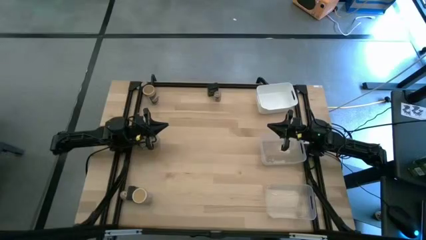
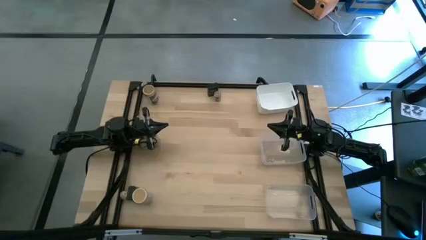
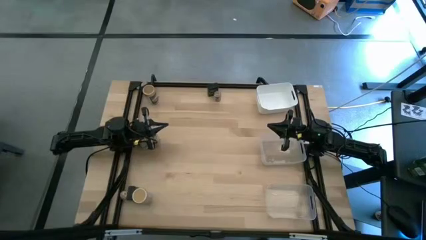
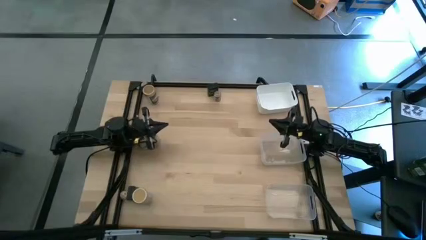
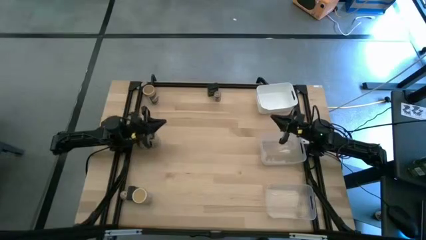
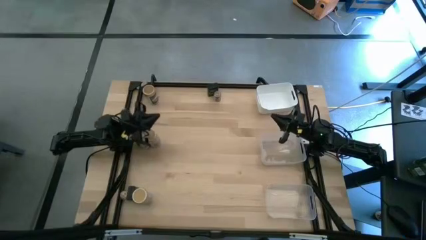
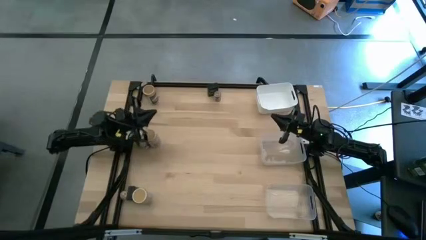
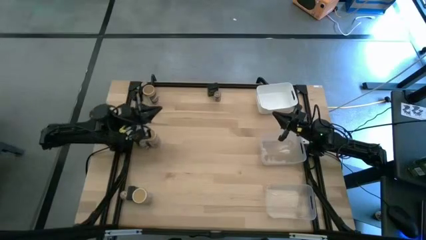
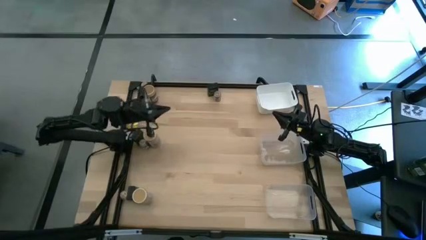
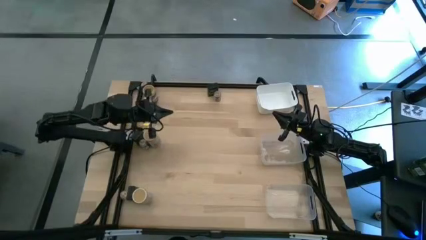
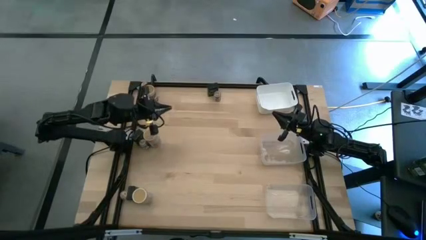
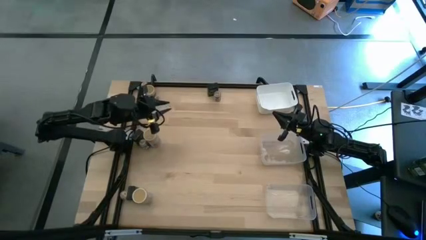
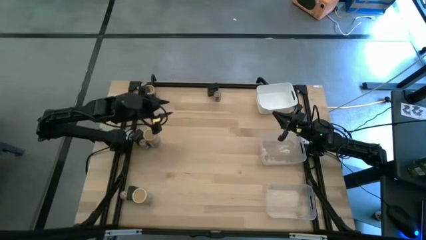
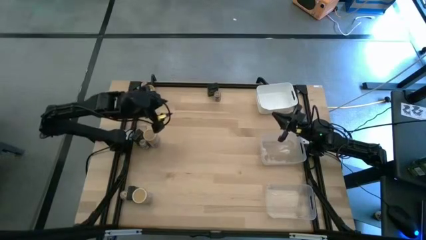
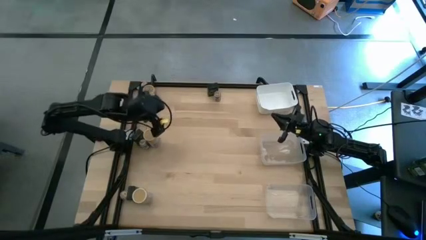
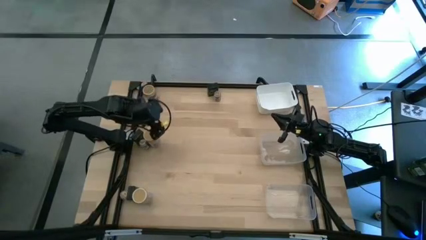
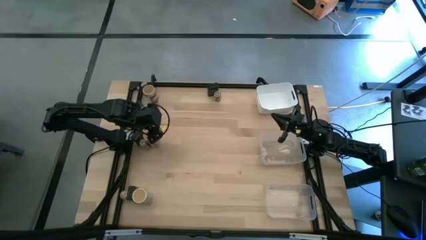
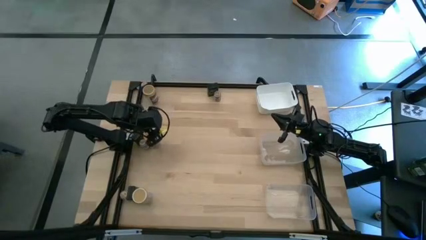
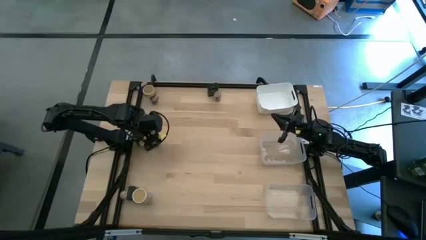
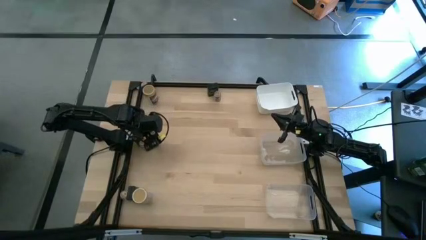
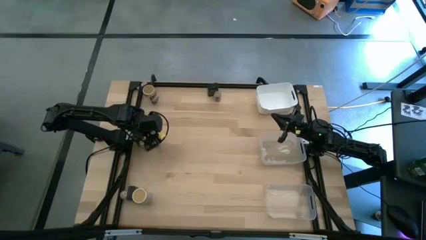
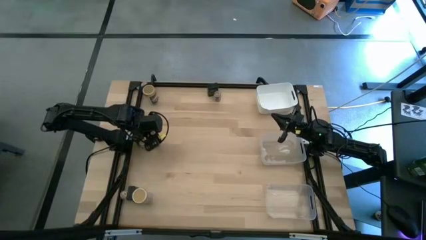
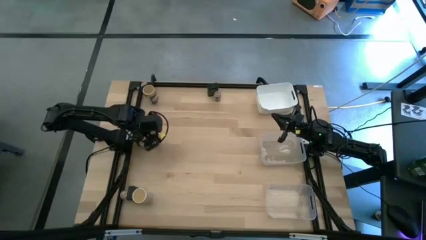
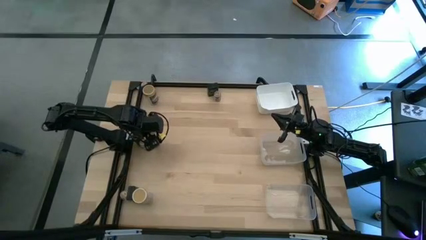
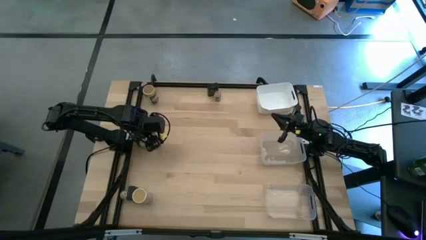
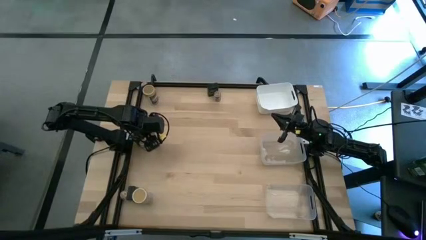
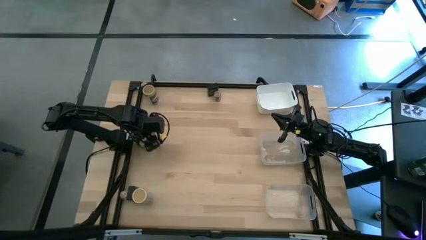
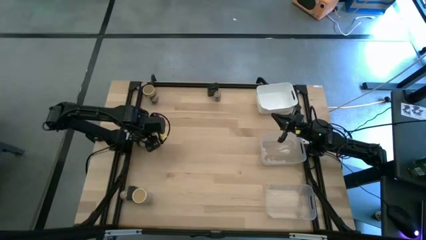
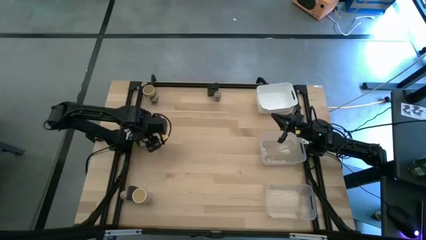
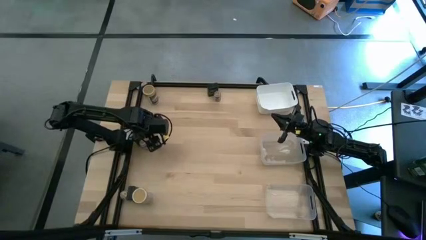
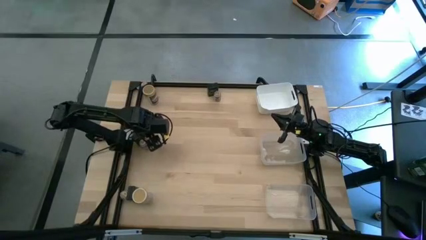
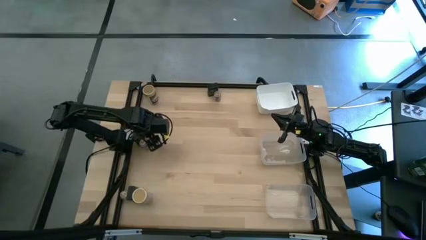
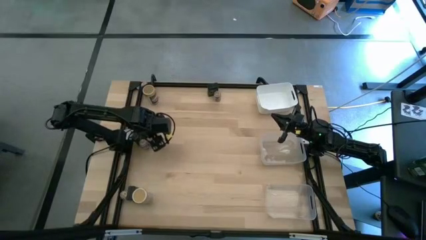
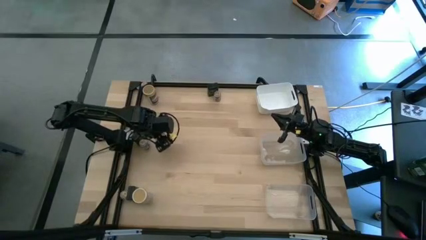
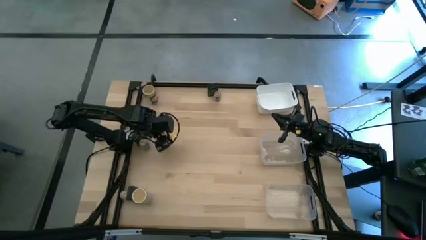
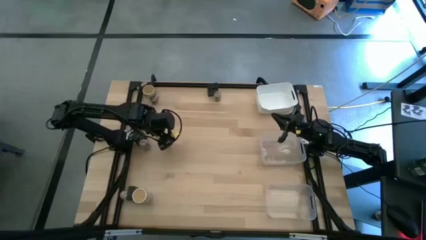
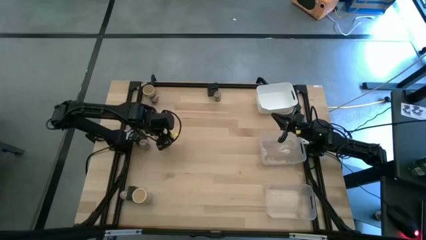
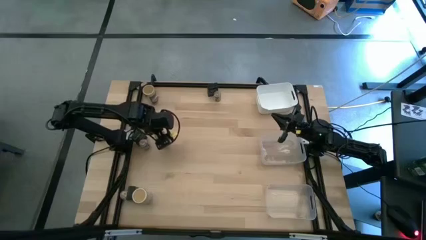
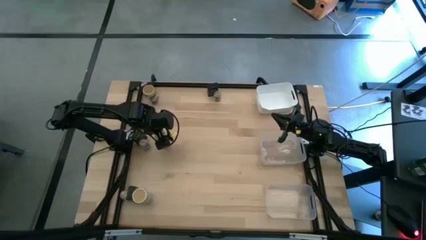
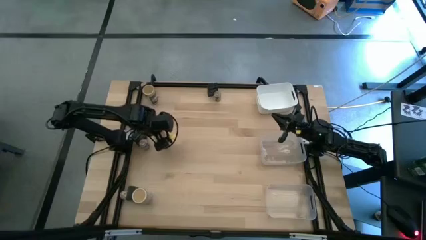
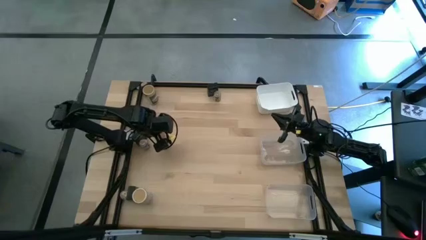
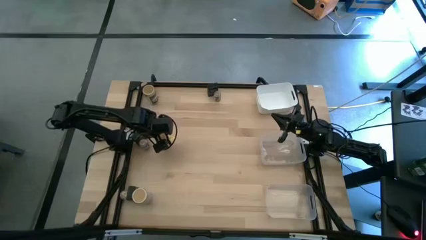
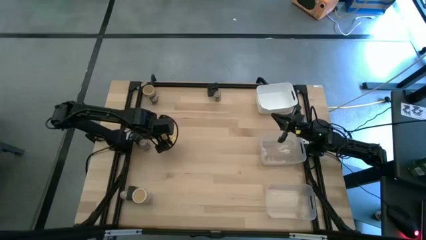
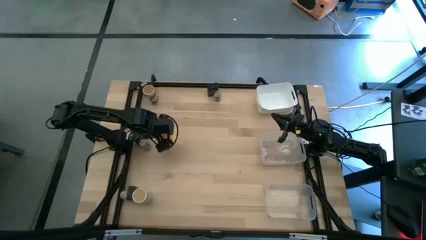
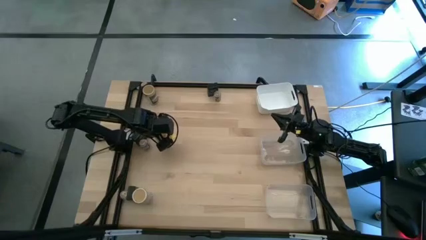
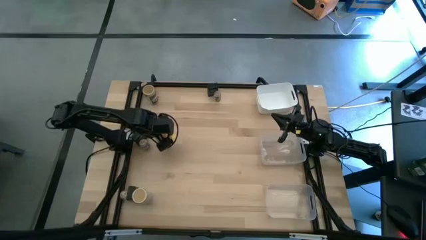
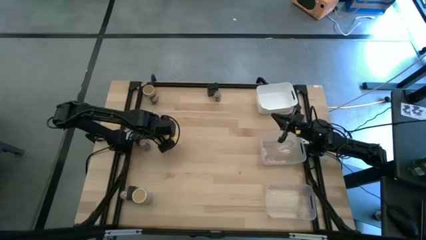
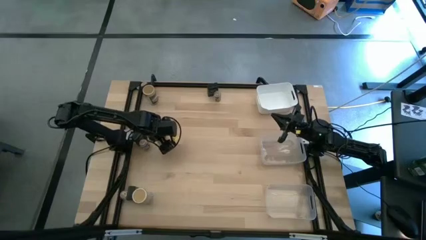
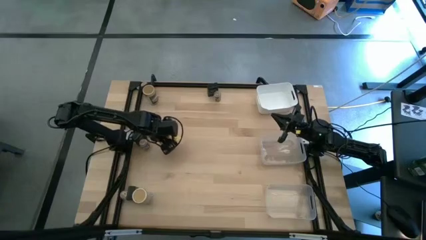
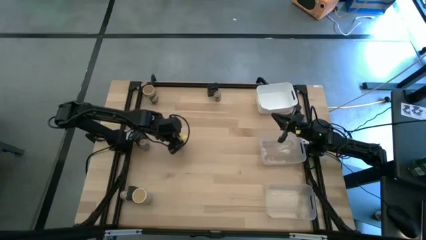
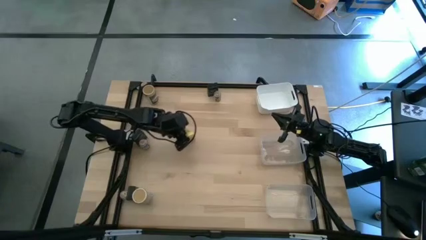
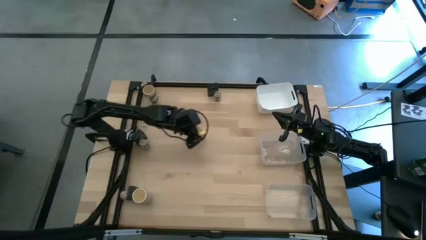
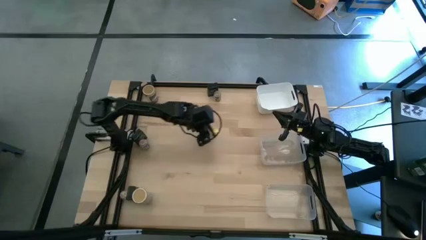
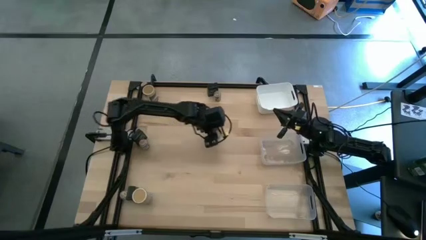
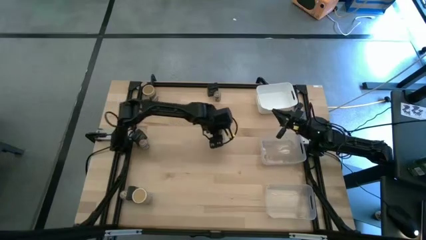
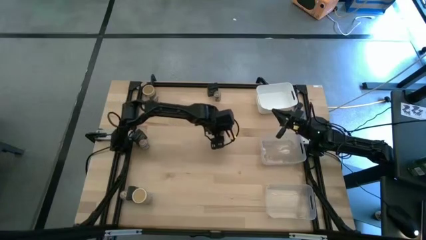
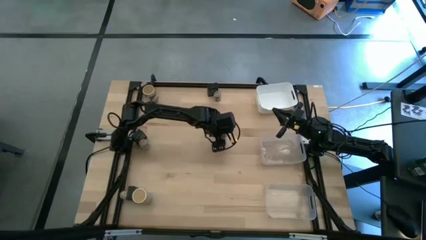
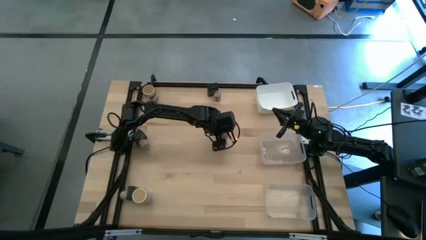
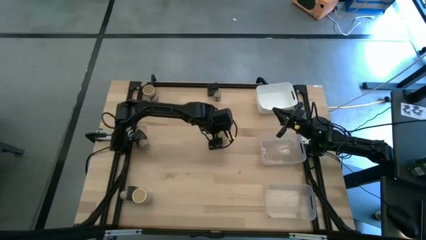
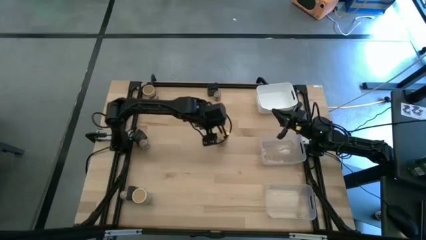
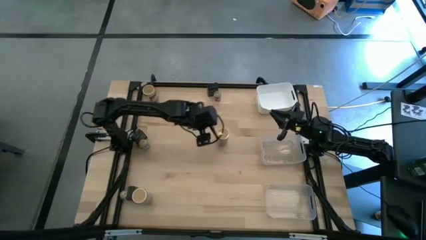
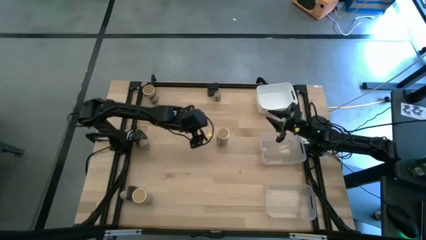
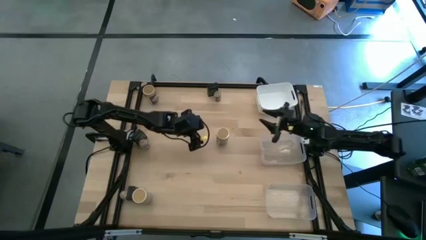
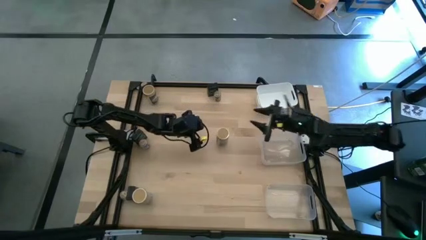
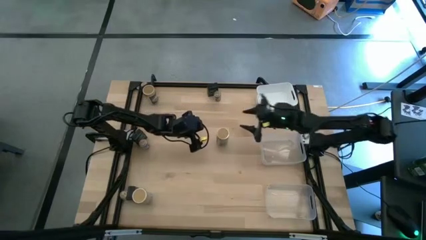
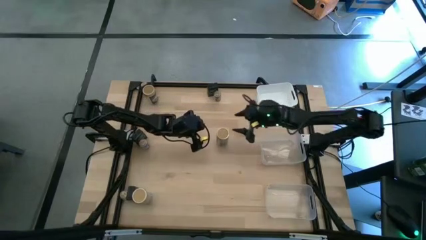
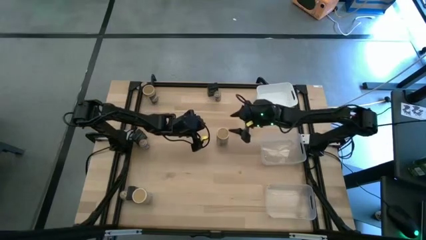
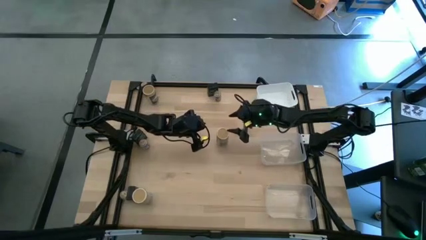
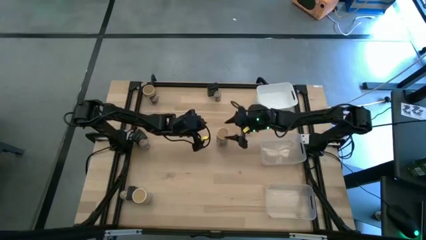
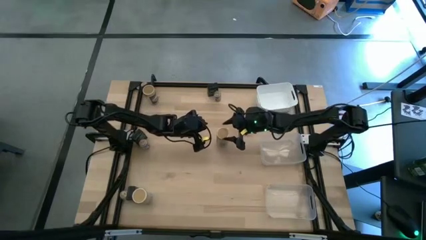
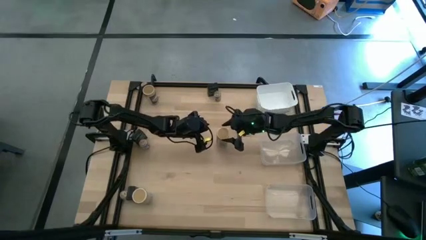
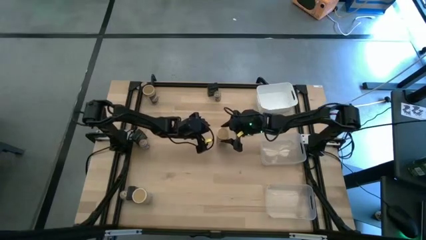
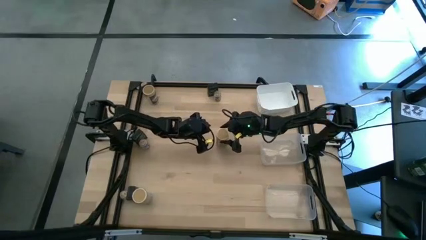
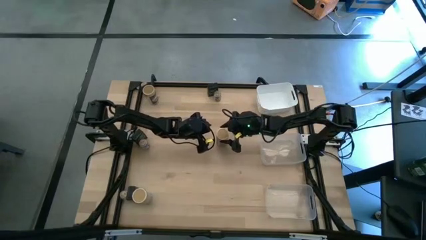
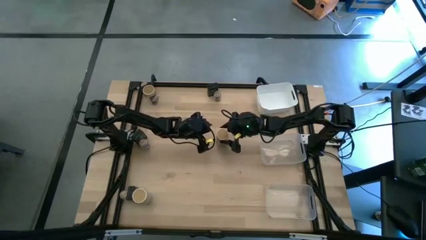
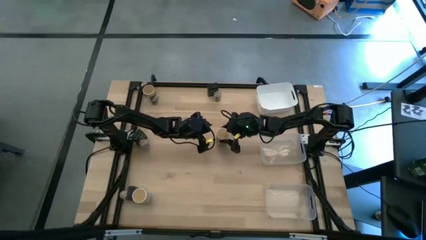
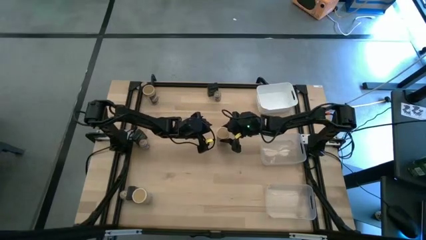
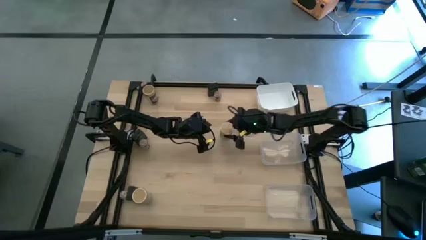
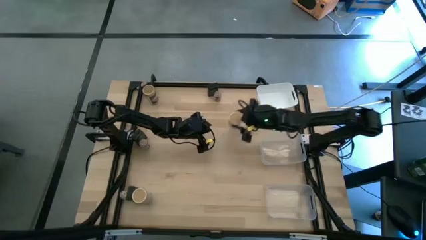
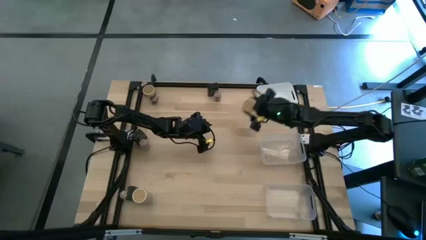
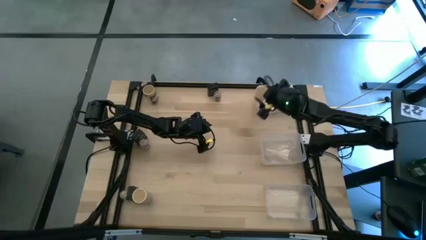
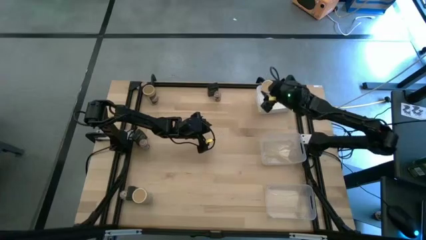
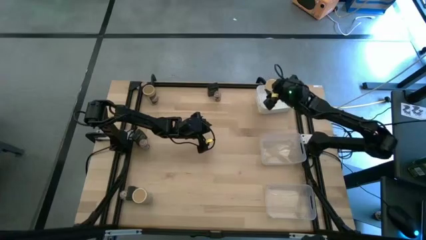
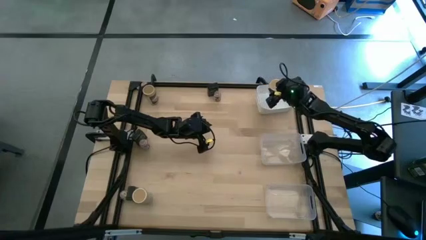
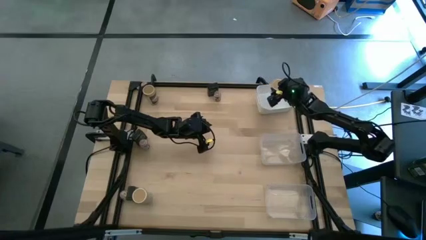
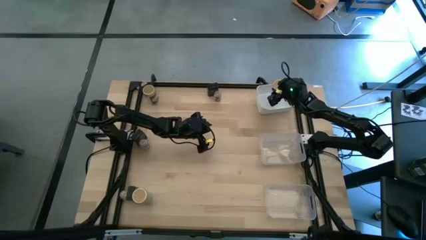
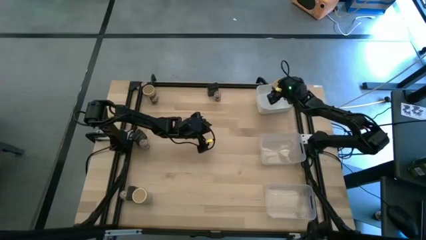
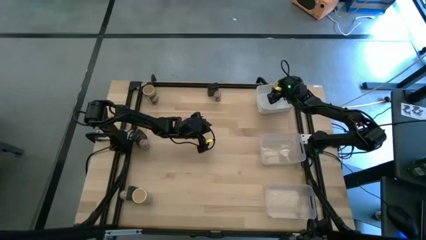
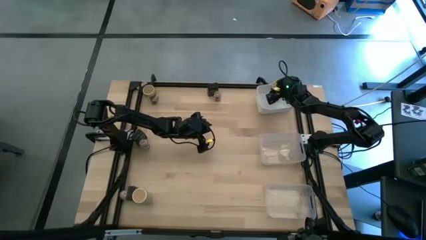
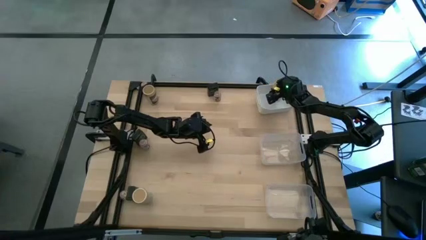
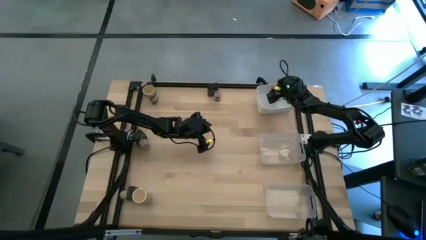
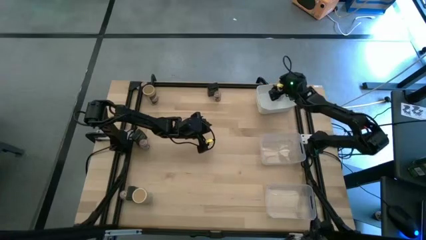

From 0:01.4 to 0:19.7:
Task: Sort spices by type
Put the middle brown seasoning bottle into the white bin
